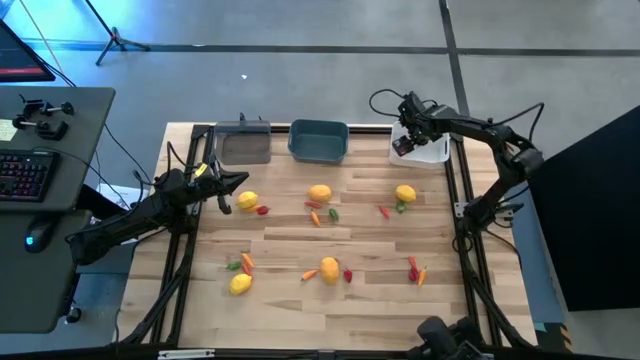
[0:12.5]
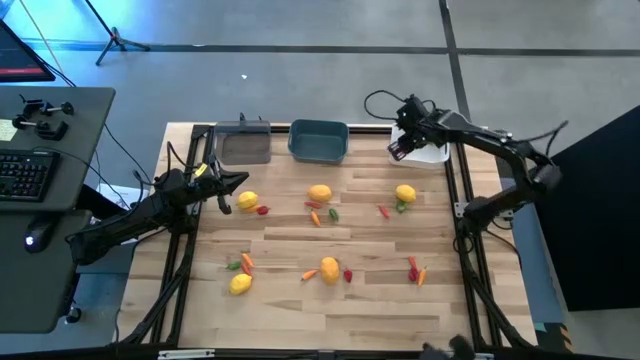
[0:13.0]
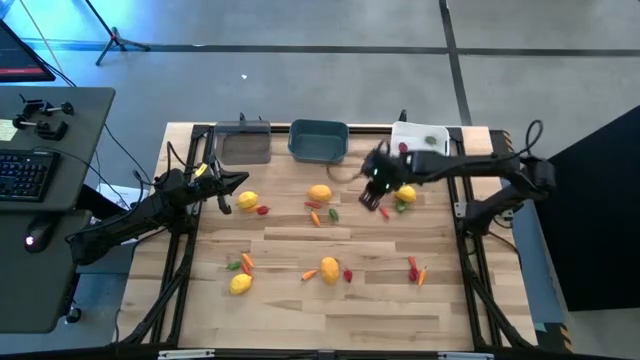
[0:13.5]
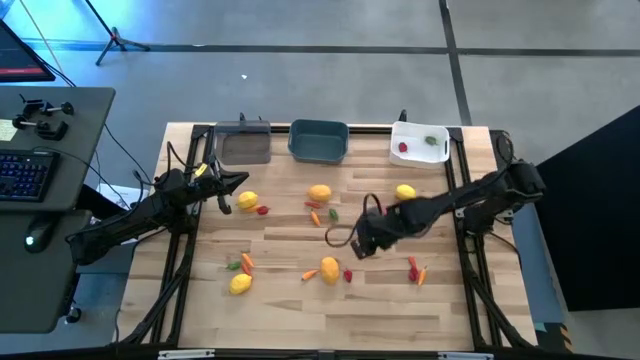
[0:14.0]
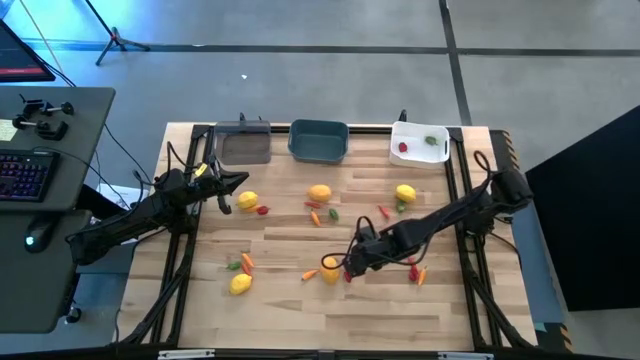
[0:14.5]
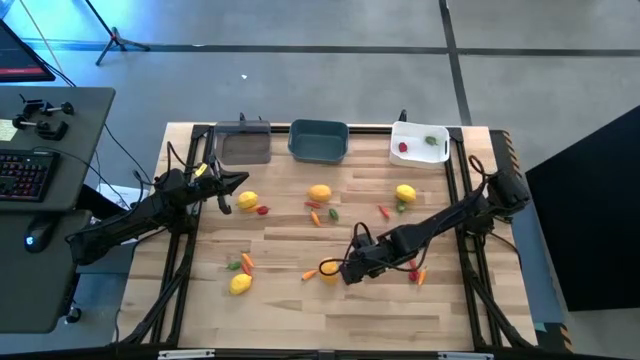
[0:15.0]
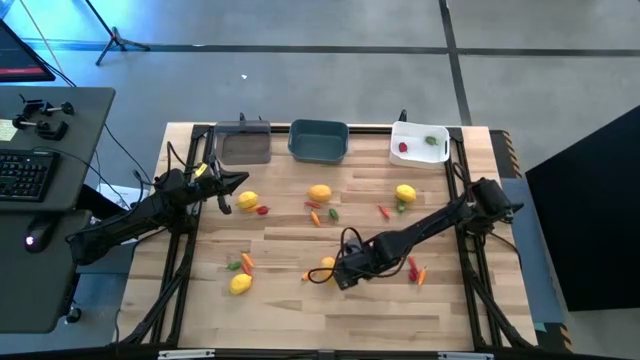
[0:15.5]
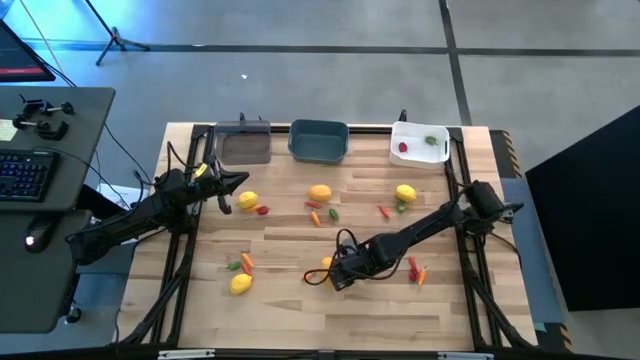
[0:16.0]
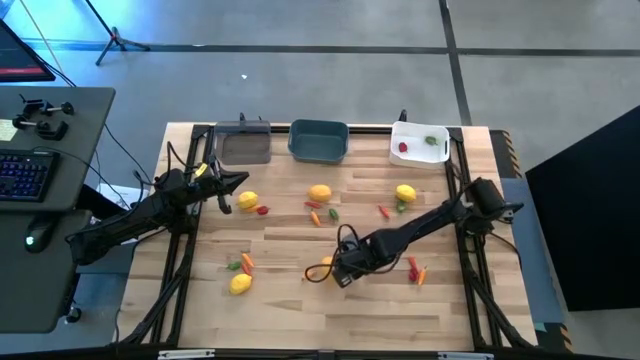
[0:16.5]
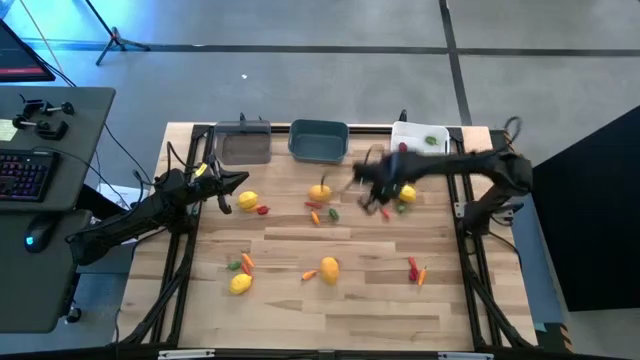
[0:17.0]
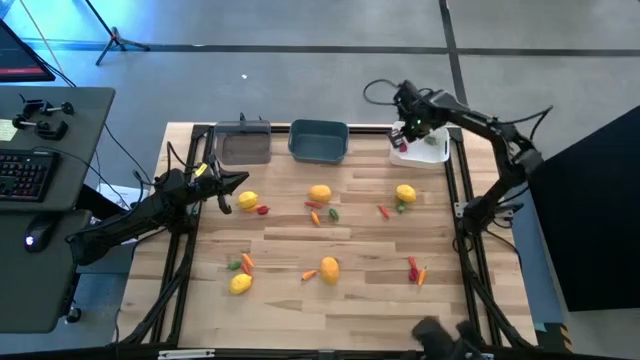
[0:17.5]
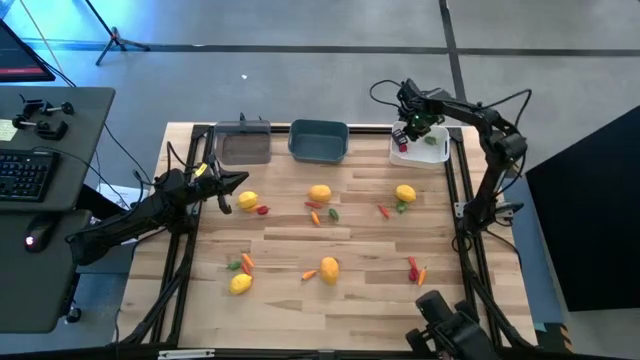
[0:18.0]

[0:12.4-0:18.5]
Task: Sort produce into baskets
Put the red chili pepper into the white bin

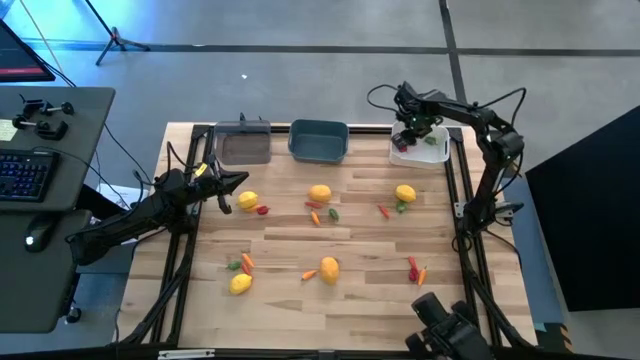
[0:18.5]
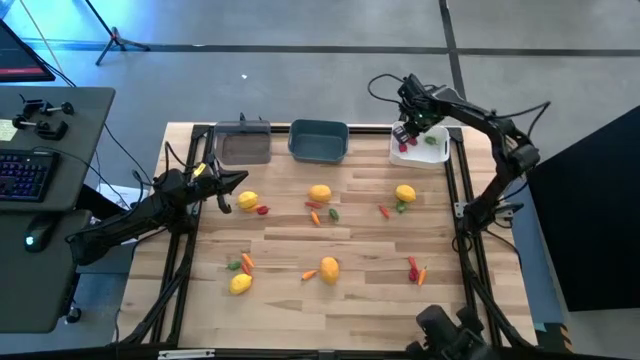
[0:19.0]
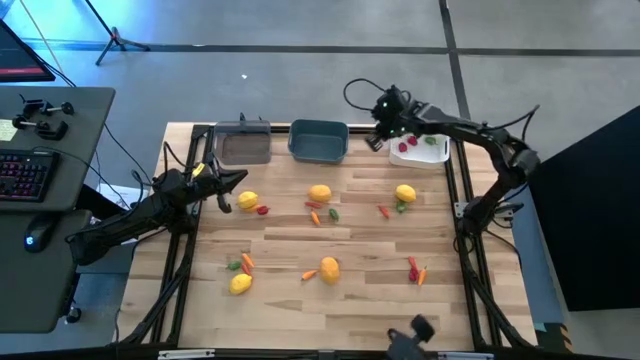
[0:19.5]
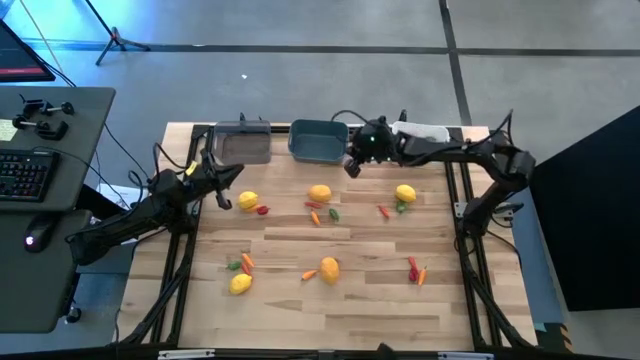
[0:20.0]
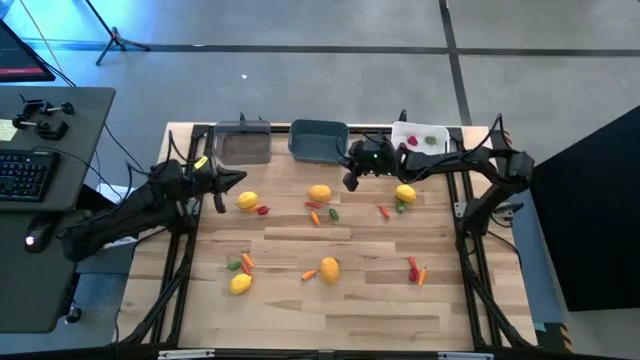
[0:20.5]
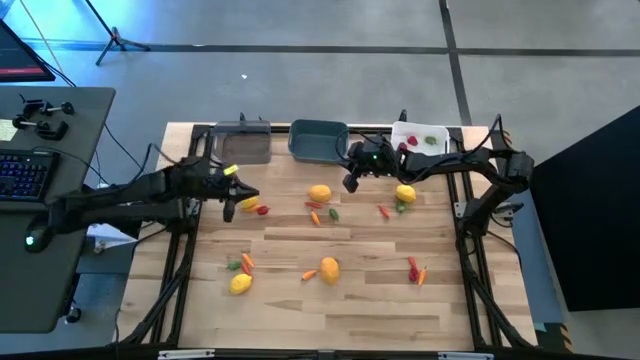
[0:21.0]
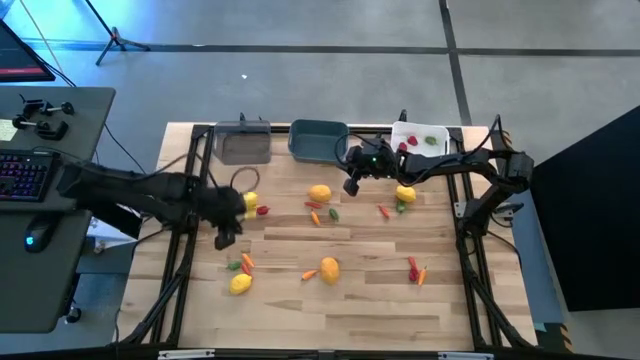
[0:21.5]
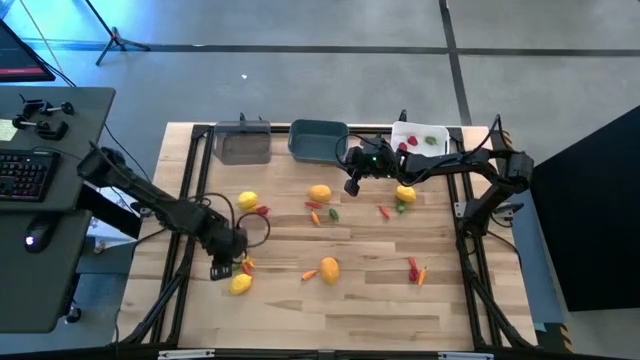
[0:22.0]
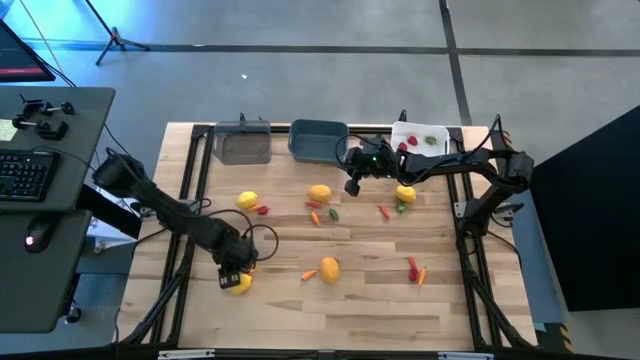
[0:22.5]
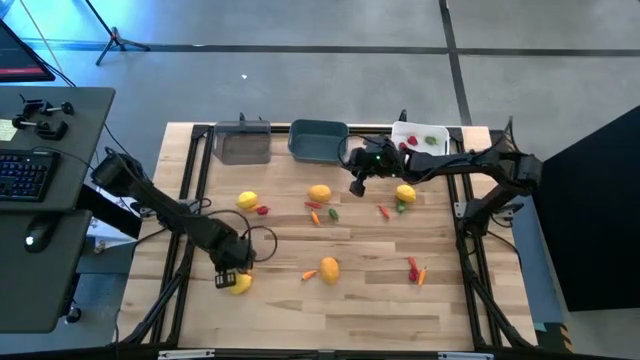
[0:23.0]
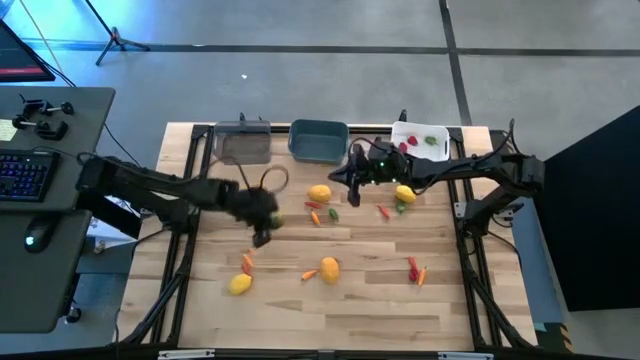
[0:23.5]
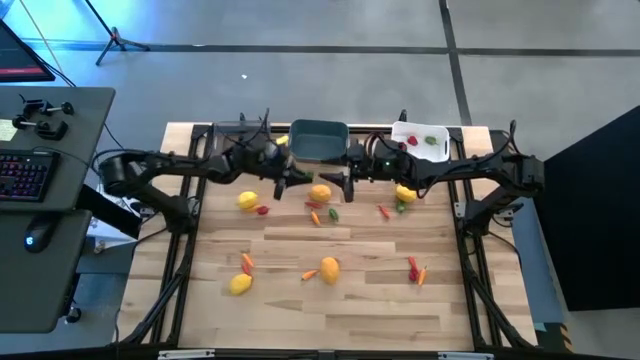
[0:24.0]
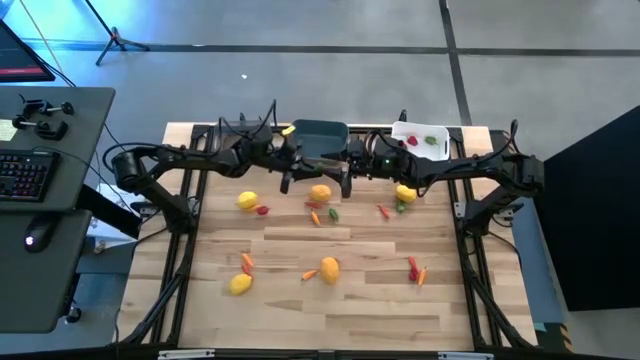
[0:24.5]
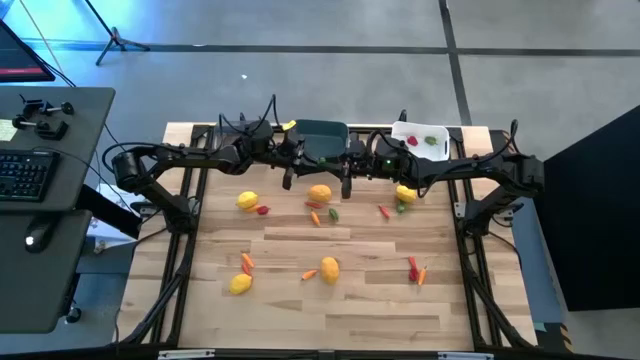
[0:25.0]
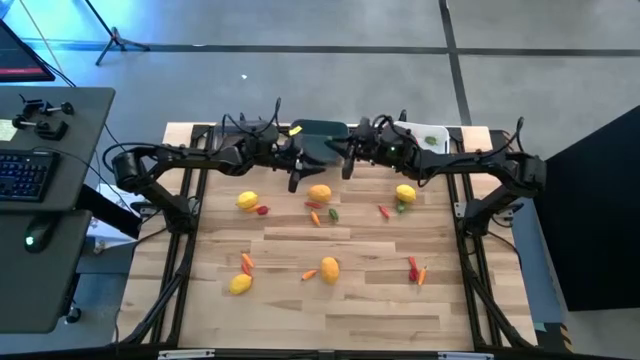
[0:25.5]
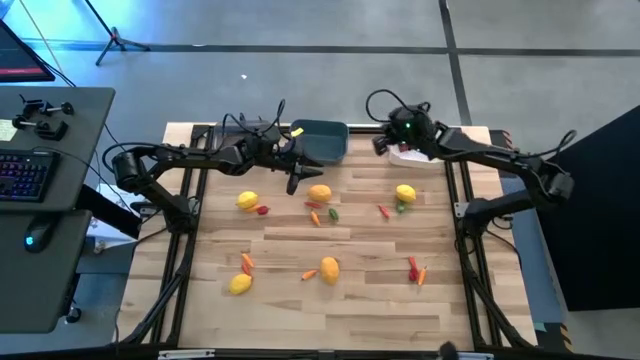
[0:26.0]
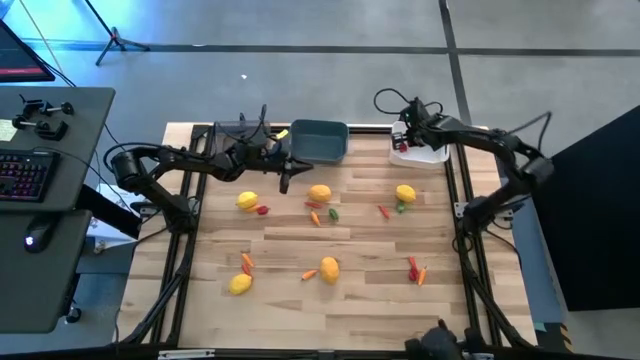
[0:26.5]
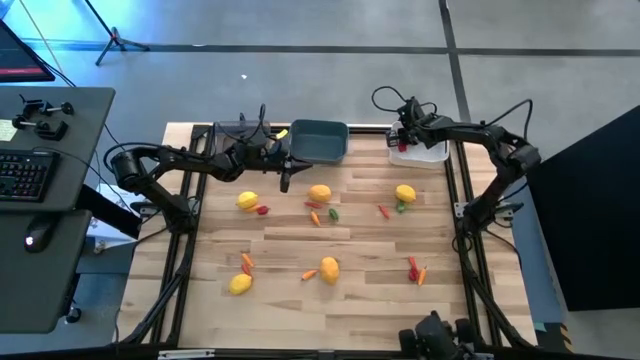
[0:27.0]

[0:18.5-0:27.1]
Put the green chili pepper into the white bin

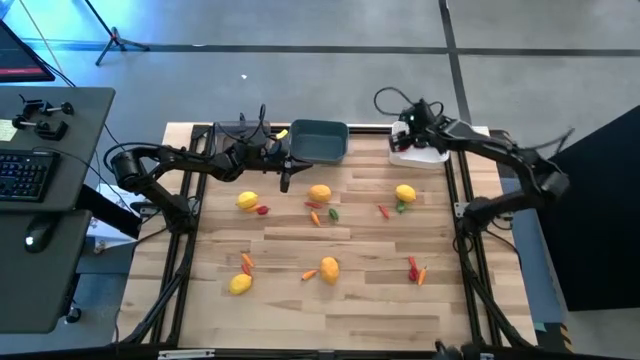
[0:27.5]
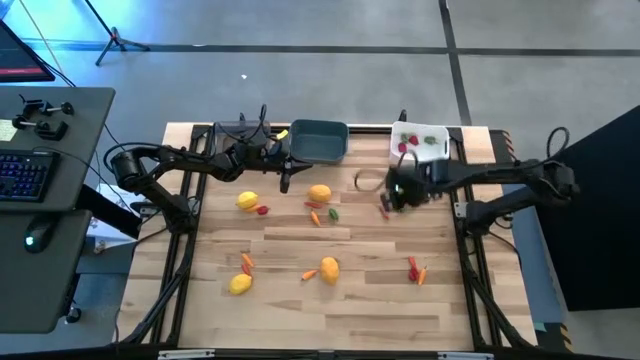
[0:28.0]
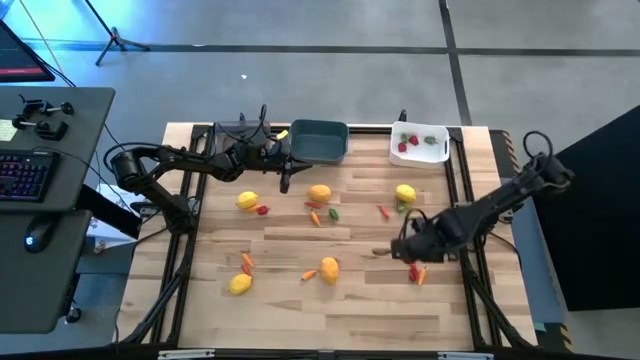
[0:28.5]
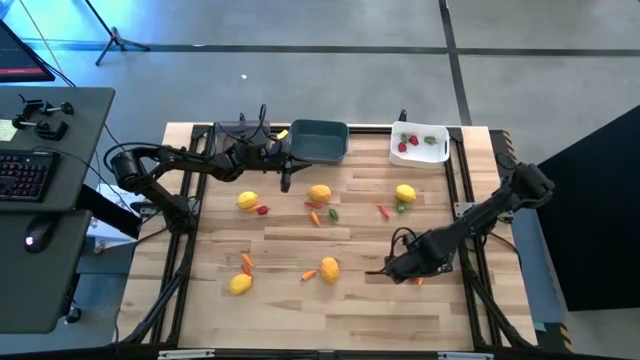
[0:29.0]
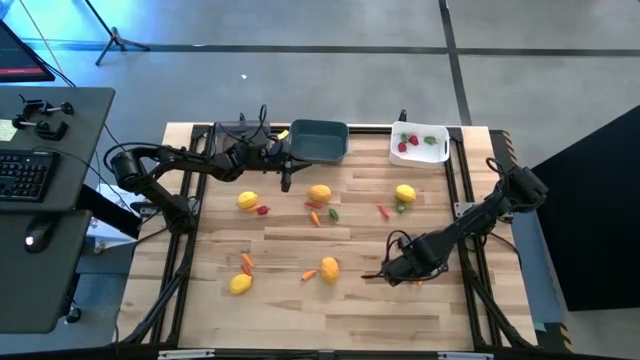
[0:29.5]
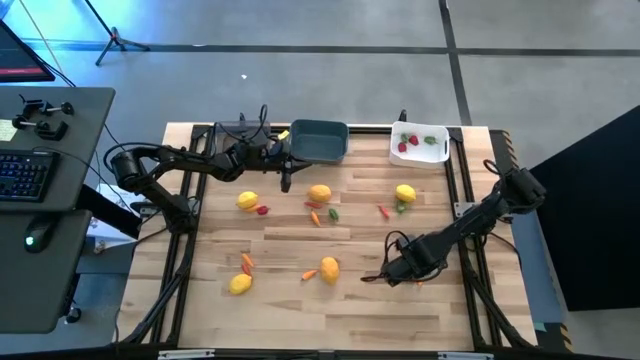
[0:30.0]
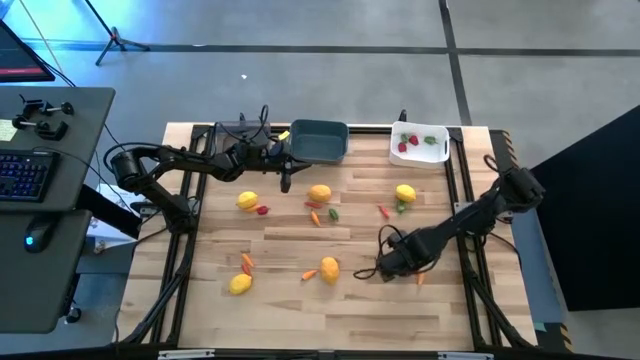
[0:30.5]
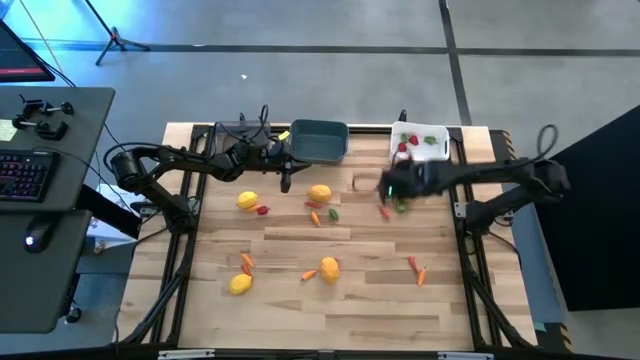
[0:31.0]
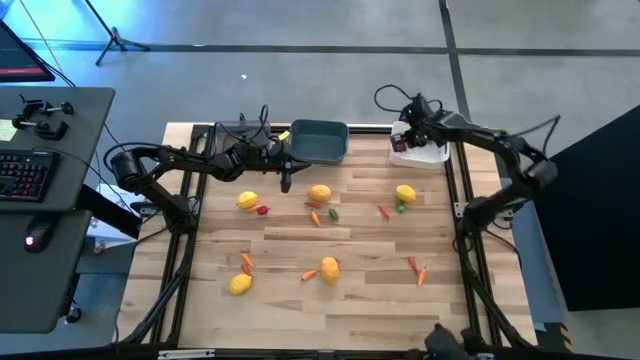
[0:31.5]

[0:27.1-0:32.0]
Put the red chili pepper into the white bin

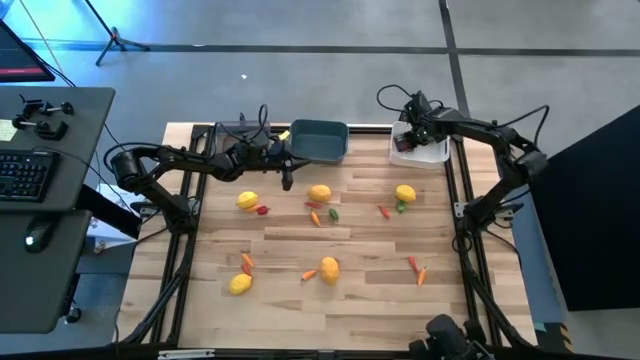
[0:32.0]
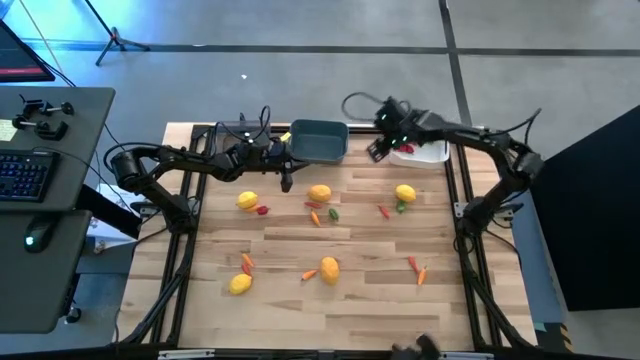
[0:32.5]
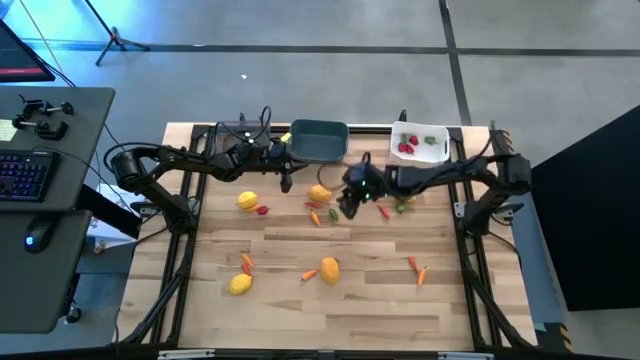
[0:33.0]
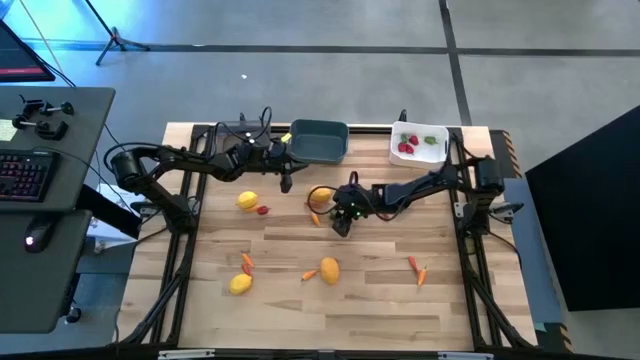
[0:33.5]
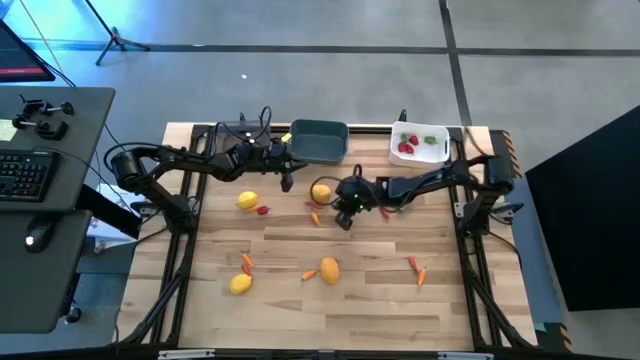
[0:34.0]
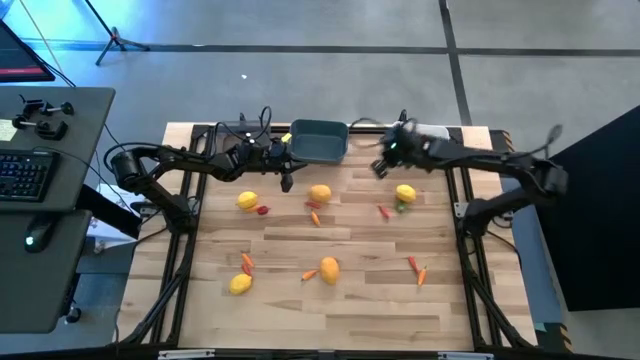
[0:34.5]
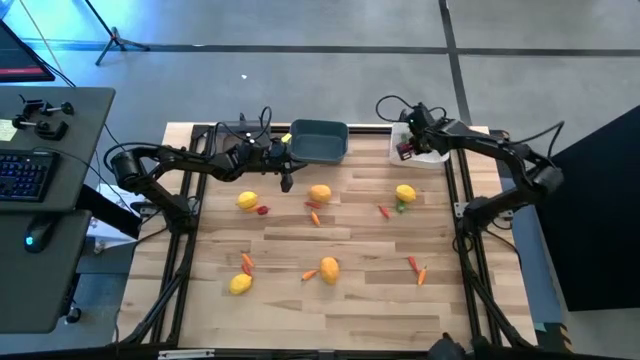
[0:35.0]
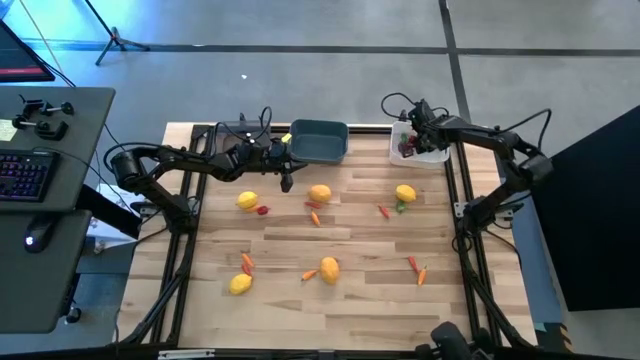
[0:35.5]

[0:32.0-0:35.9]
Put the green chili pepper into the white bin
